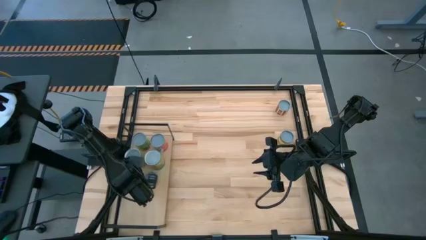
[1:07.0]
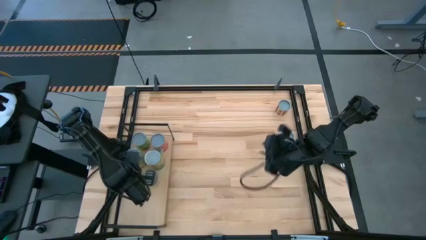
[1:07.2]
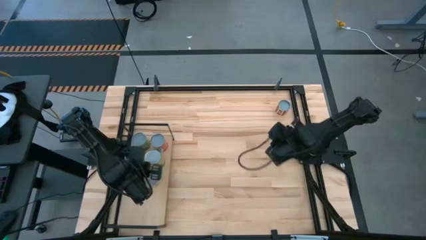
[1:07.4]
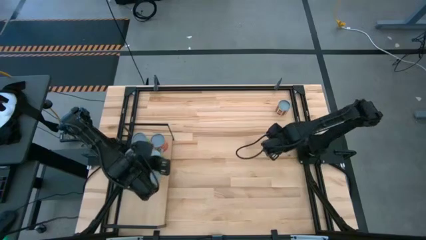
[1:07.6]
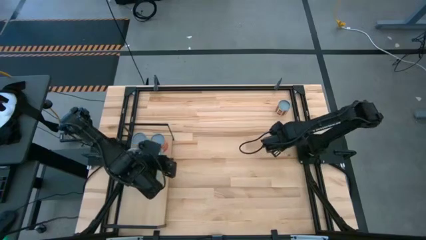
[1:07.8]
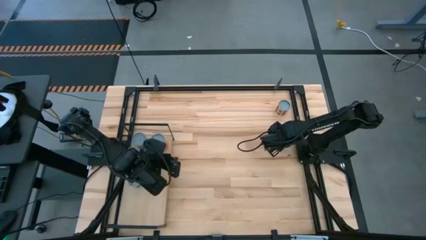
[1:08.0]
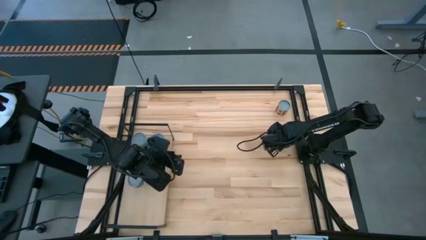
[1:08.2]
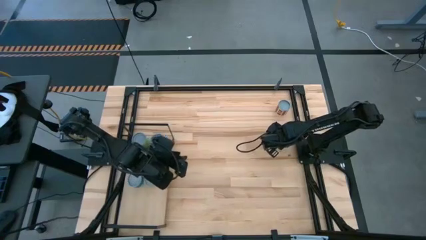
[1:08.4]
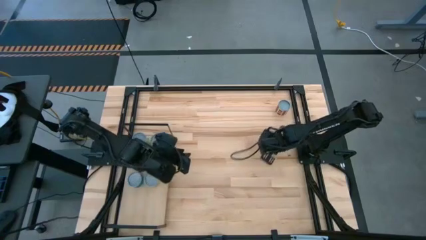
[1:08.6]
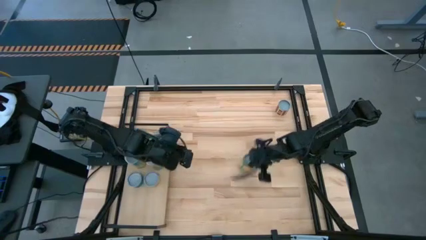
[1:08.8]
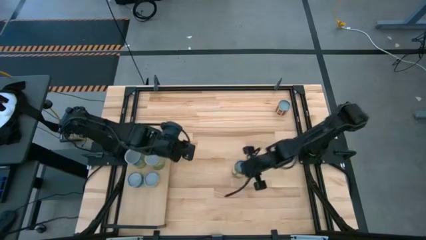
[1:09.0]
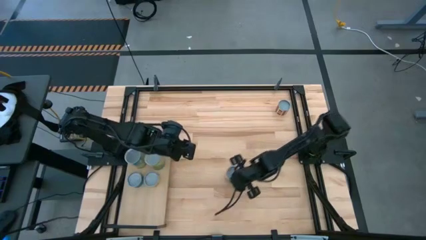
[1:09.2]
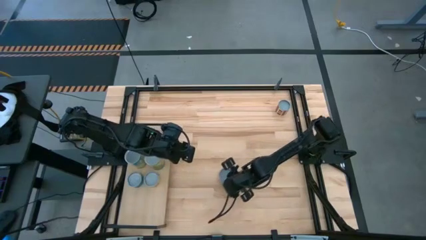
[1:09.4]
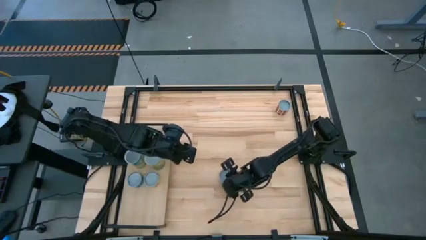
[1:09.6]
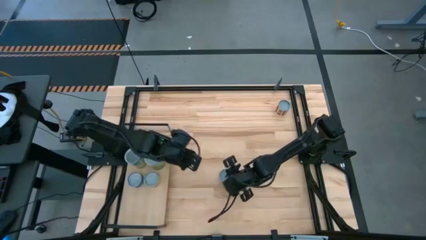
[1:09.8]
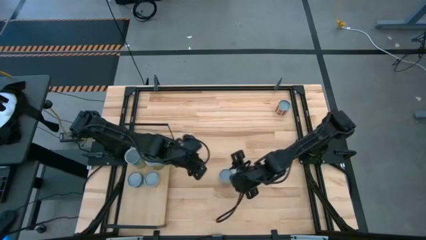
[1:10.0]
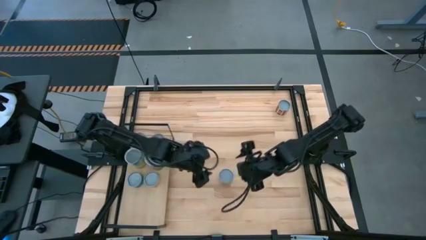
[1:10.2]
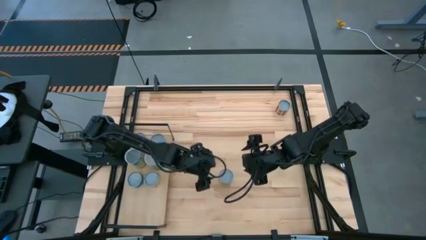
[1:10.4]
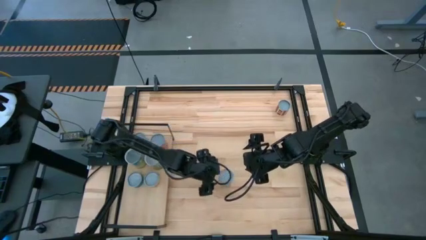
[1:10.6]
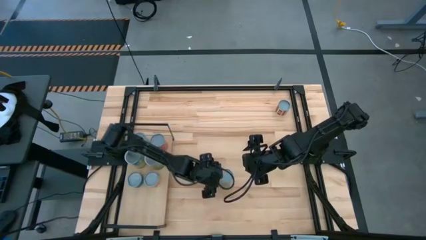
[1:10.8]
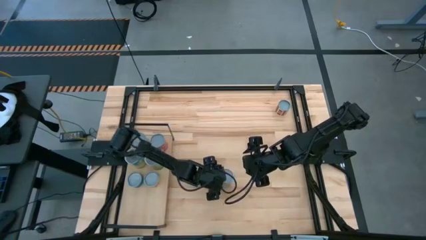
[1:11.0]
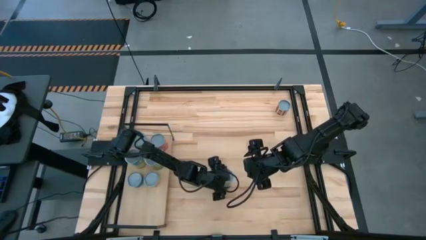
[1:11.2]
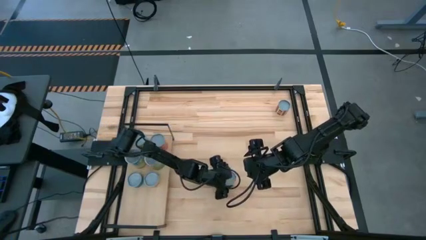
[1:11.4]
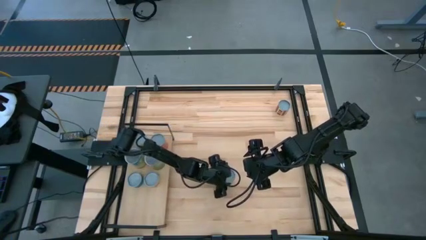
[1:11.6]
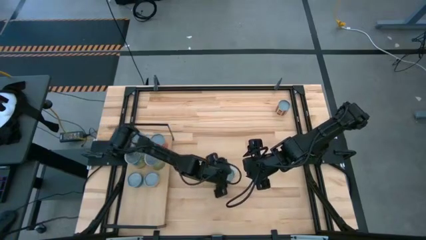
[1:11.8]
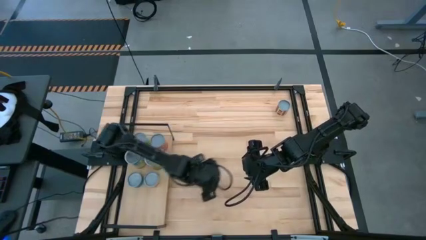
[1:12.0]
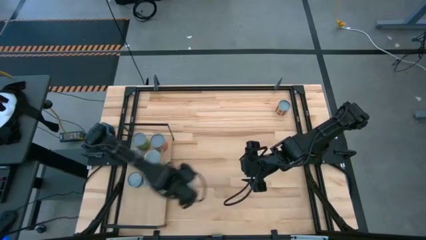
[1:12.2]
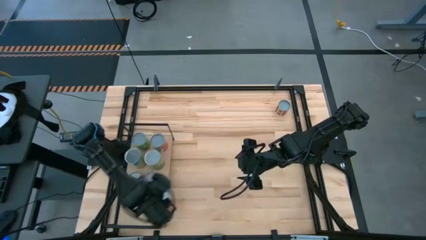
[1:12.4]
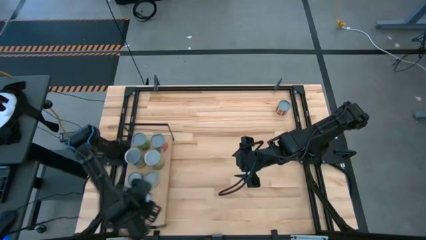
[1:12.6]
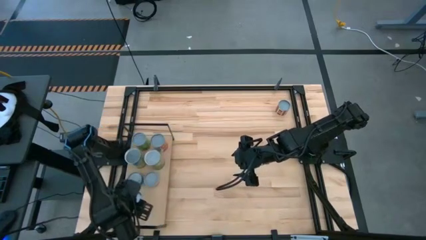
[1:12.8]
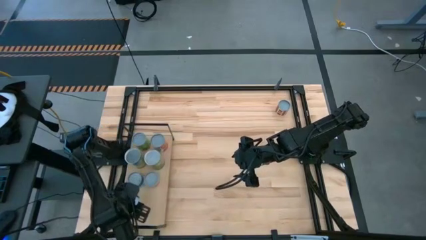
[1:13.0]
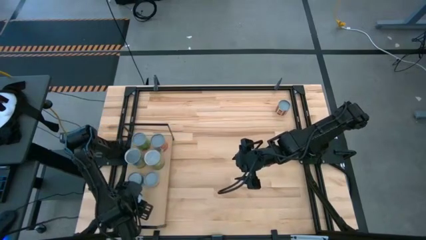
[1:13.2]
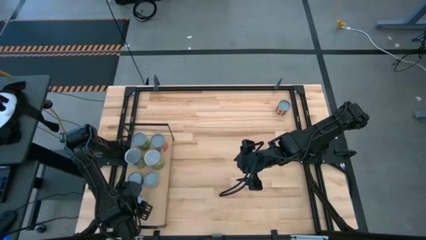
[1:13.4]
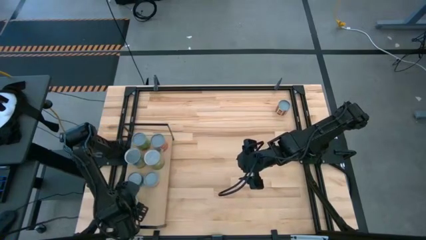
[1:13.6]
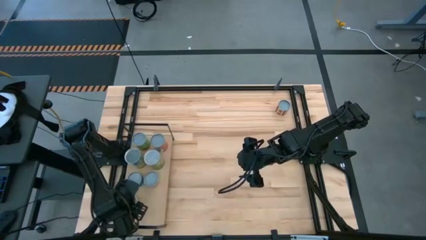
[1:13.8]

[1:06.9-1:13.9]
Task: Pick and place cans onto a shelf
Put the canned peaches on the shelf

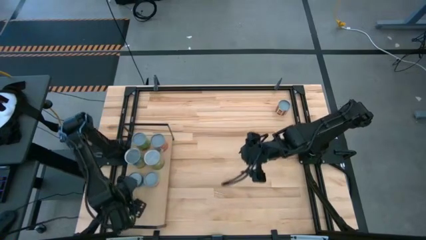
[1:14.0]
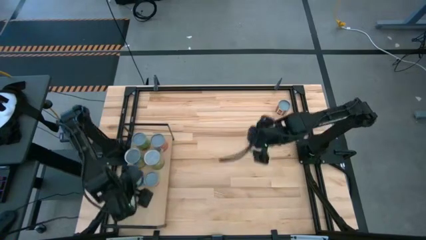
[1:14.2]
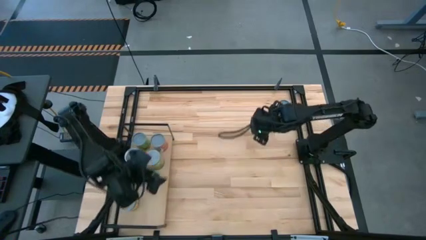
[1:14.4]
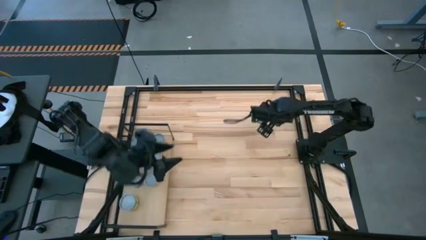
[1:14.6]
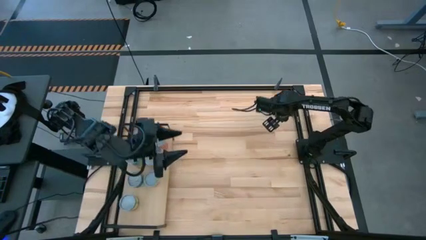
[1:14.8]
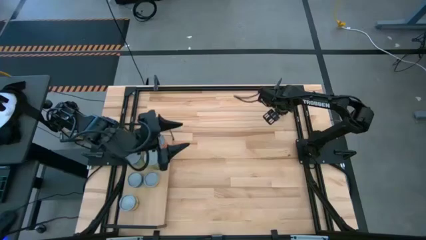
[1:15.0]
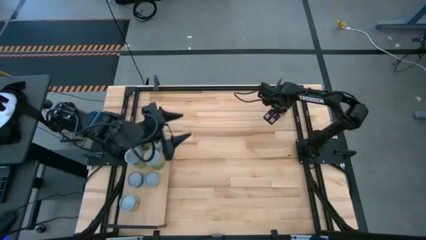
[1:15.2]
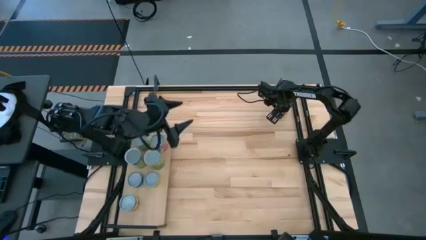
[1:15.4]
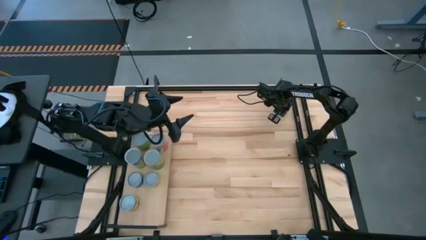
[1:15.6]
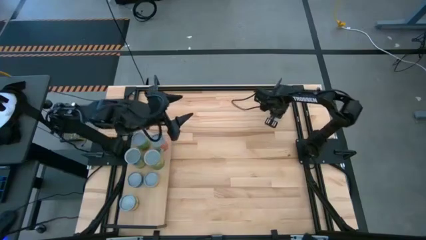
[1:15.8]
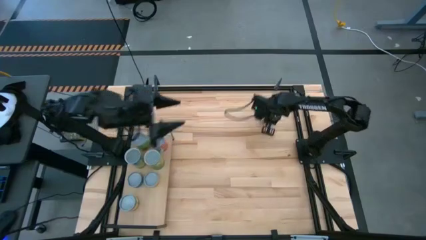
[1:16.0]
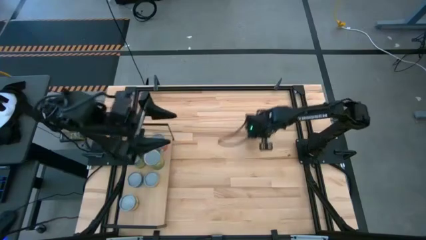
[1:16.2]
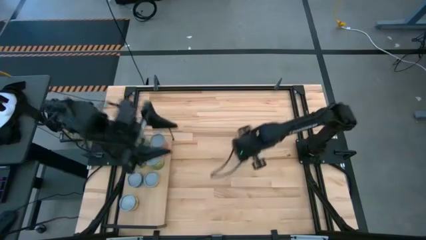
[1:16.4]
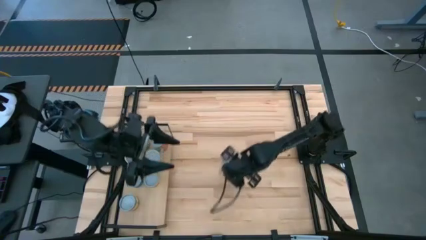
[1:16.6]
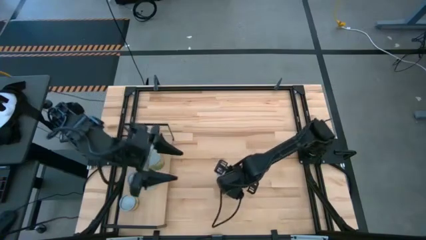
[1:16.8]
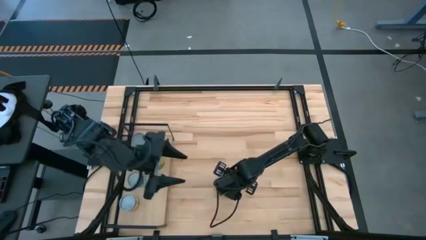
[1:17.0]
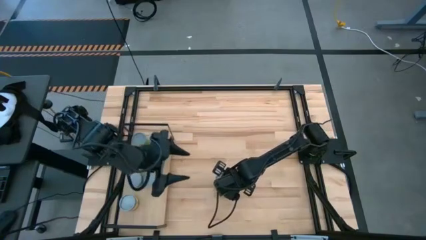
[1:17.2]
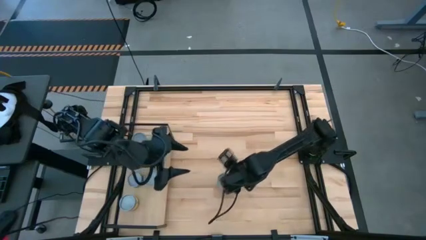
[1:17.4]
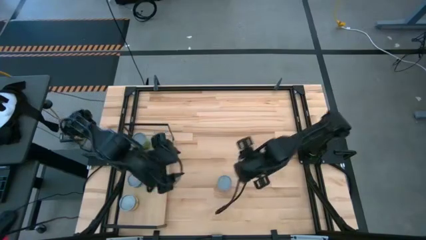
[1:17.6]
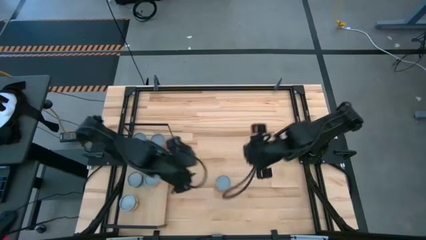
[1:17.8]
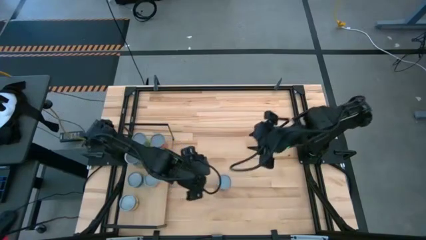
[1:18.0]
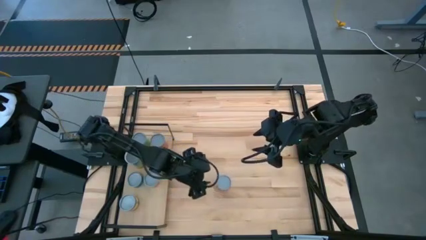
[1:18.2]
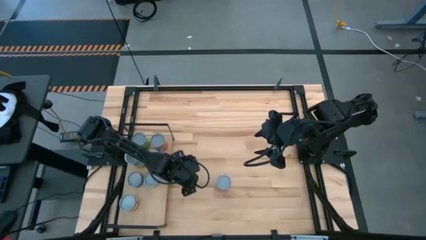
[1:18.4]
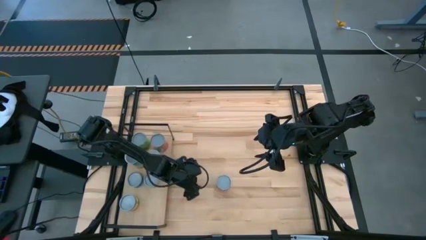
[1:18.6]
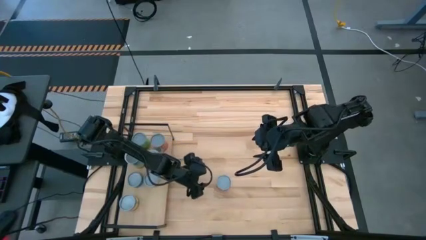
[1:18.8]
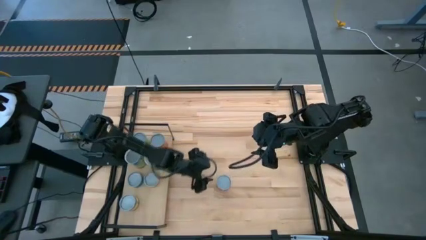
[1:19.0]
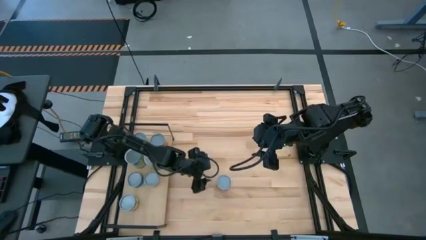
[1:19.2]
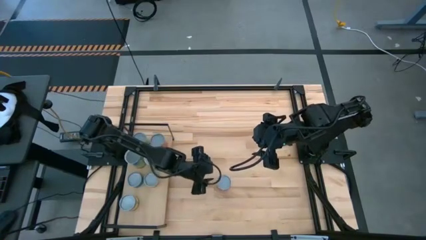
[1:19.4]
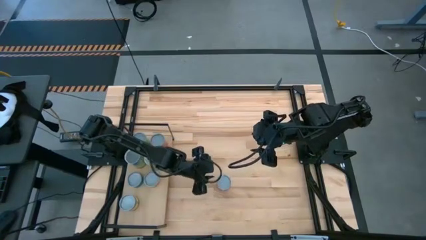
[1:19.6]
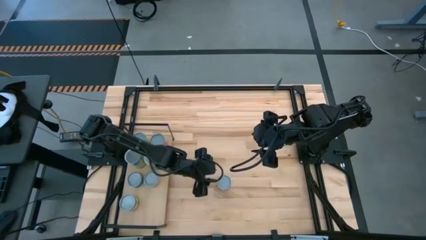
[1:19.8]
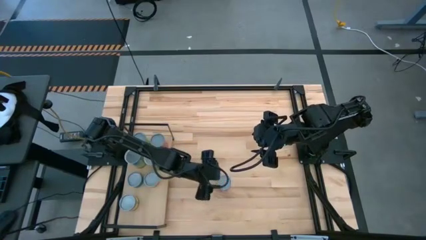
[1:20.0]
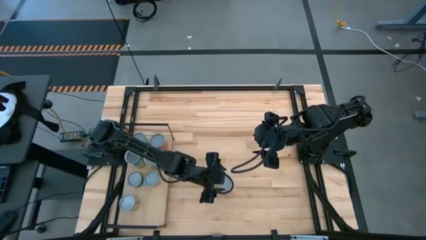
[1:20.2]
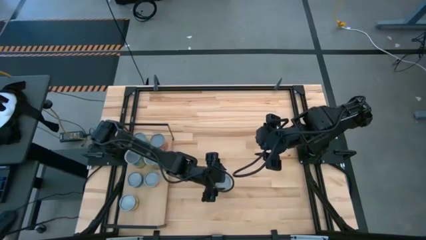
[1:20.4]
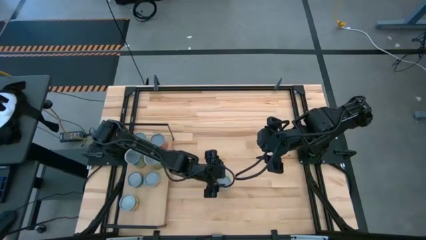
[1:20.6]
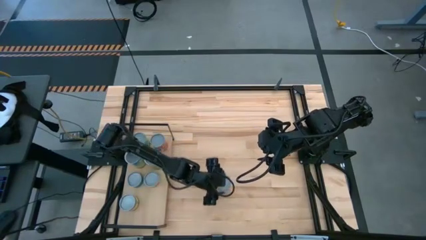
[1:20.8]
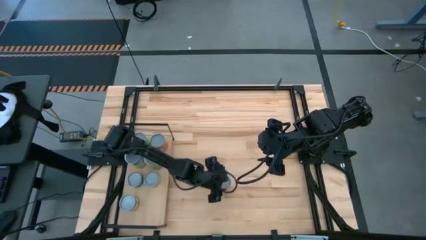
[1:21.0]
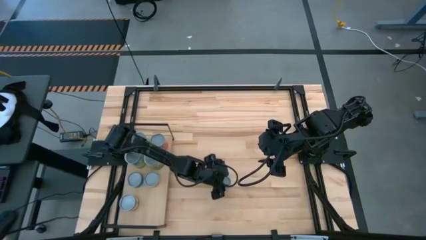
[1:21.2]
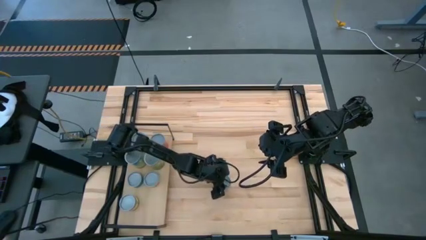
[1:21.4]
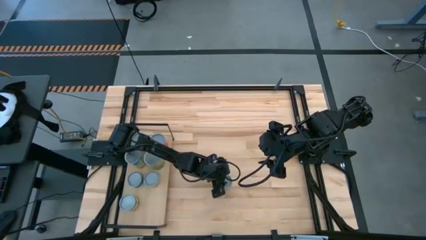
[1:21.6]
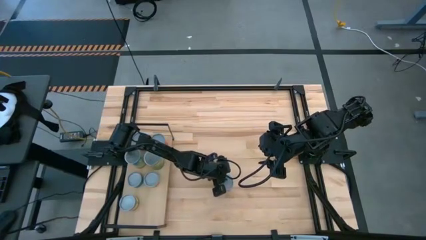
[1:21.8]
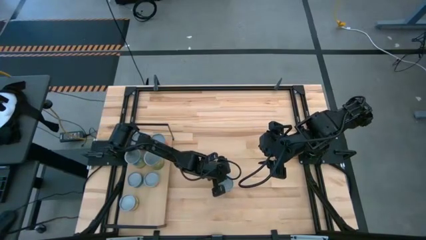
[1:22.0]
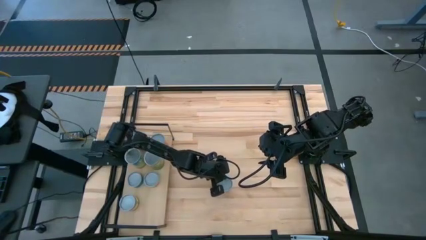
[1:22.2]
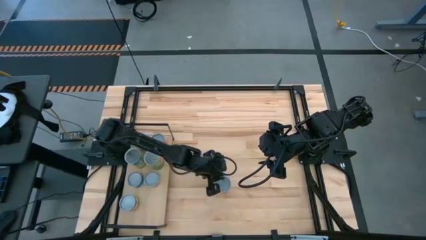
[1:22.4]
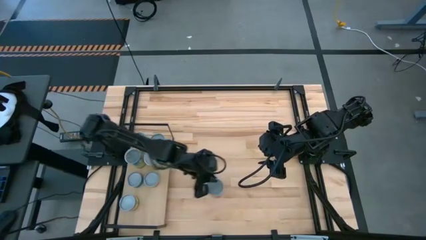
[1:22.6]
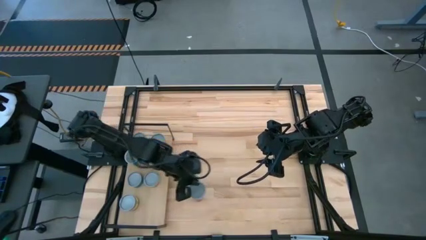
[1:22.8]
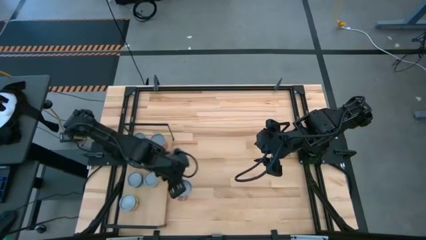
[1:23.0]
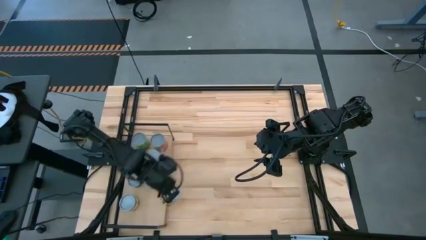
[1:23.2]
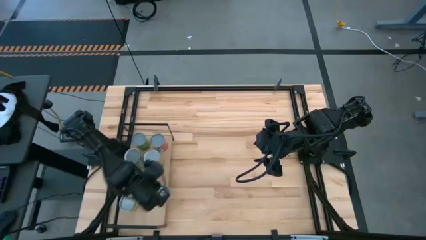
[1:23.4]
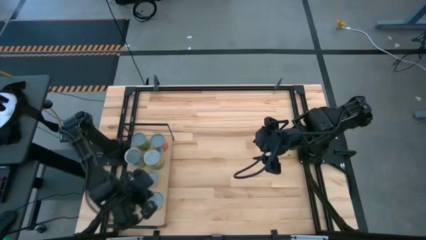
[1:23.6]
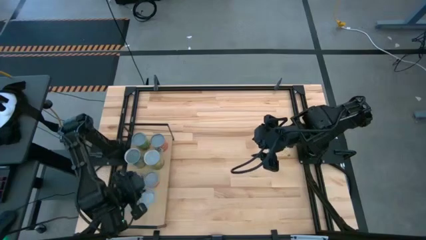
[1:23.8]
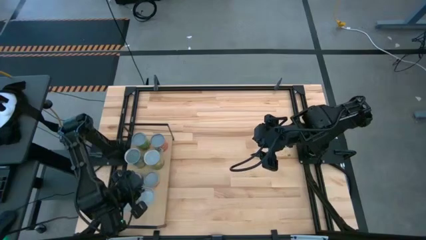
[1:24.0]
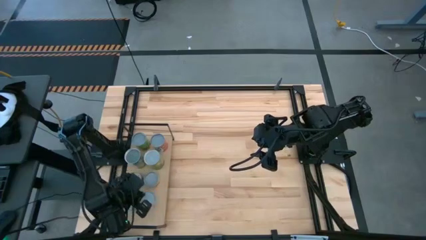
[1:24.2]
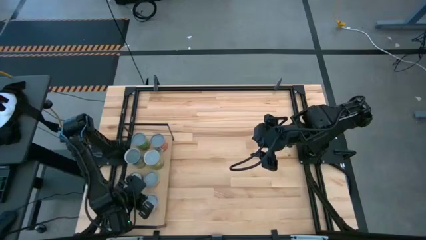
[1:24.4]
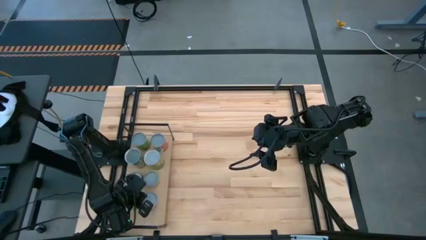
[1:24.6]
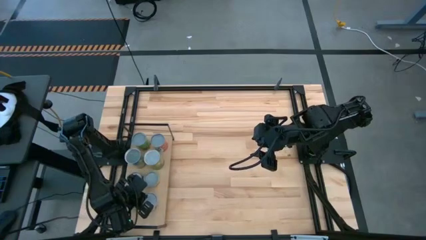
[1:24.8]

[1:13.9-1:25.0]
Put the canned diced tomatoes on the shelf
